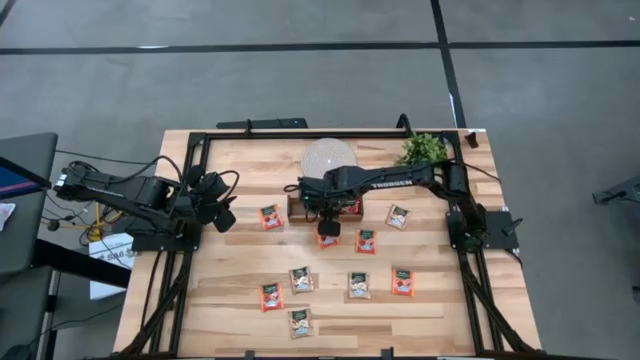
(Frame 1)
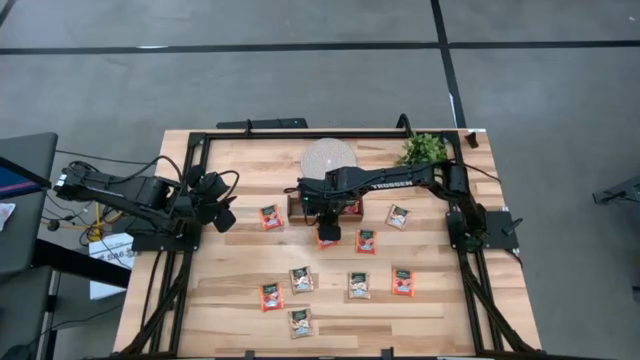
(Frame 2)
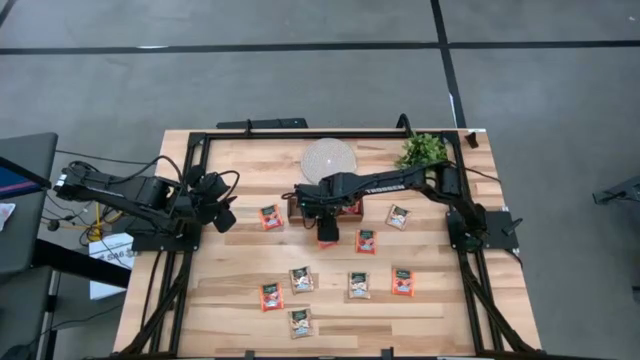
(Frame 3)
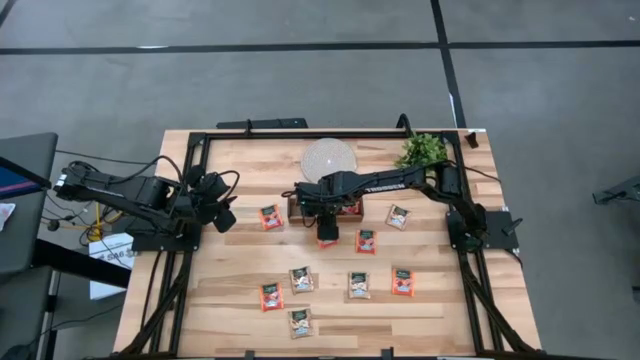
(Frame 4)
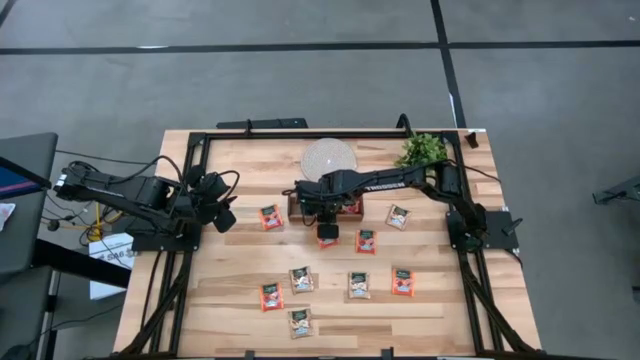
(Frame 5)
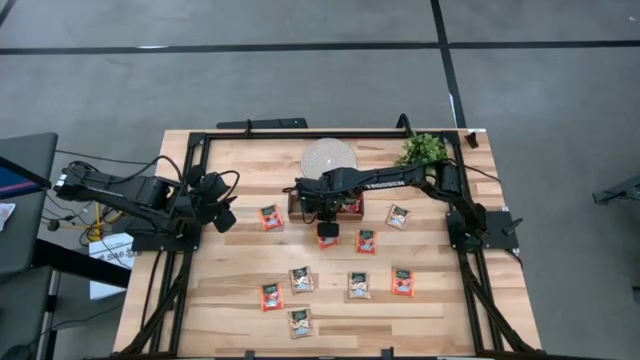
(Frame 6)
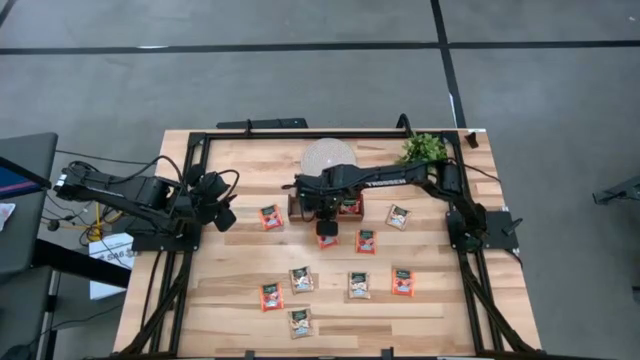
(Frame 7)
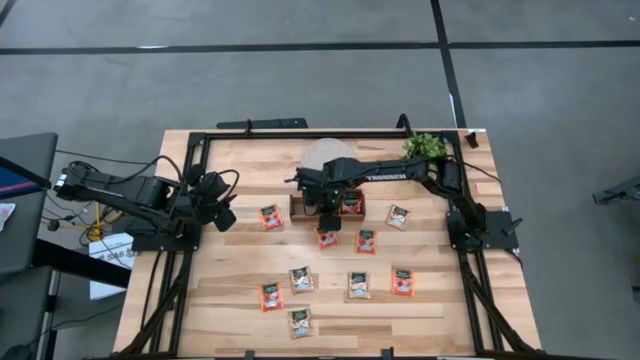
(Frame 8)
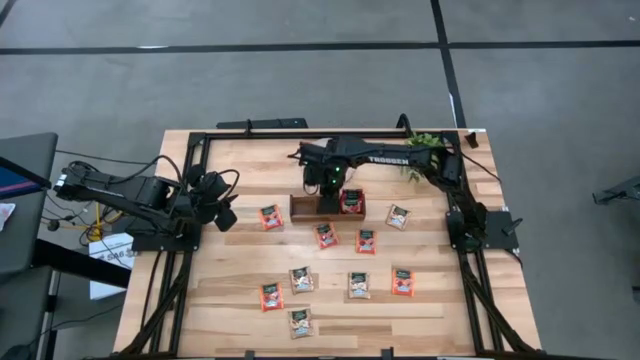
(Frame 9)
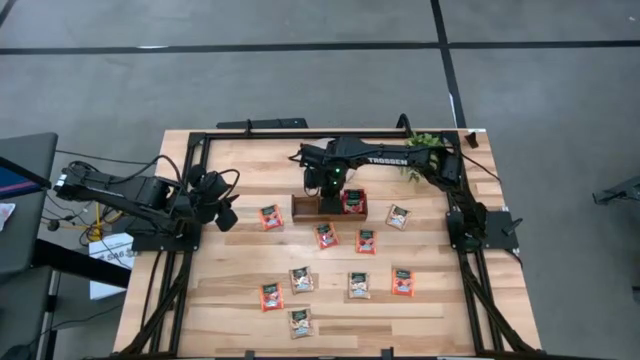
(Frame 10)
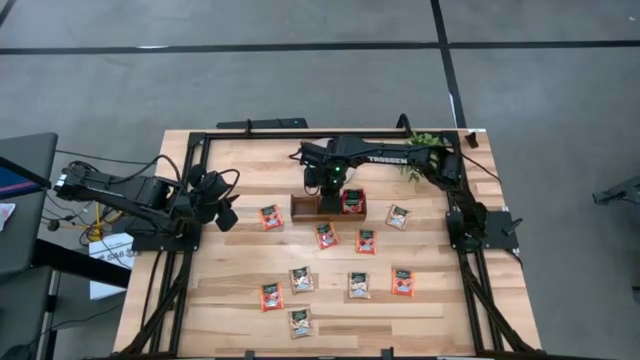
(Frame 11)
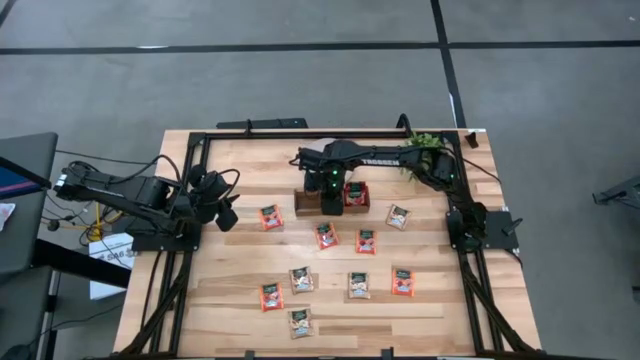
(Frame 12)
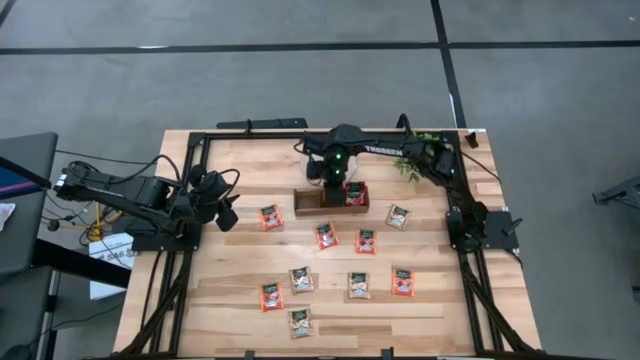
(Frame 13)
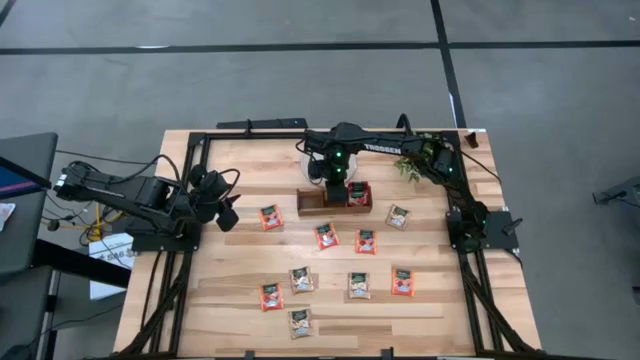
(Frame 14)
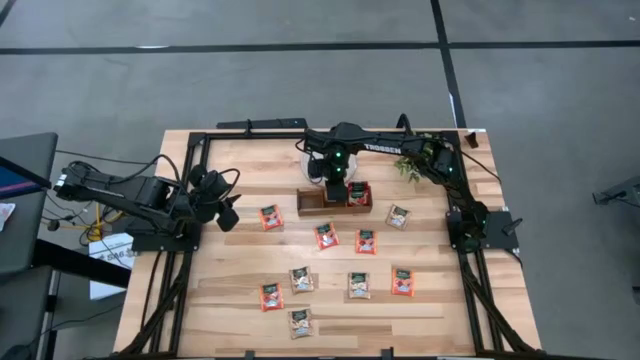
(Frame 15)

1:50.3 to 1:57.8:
Task: Pick & Place Tea
Put the brown tea bag into the middle slot of the wooden organizer

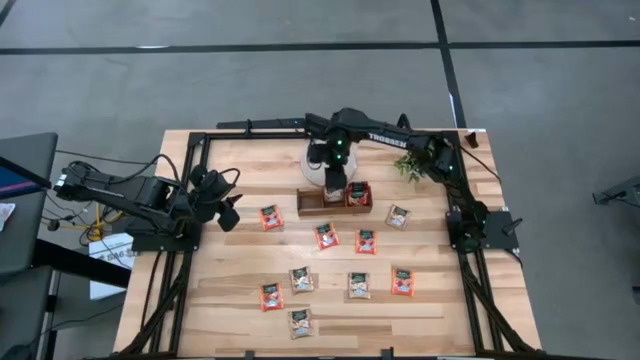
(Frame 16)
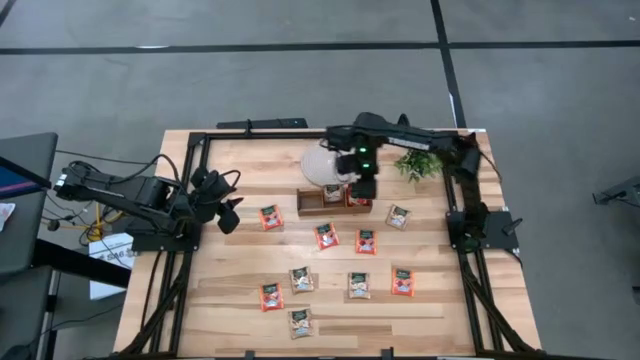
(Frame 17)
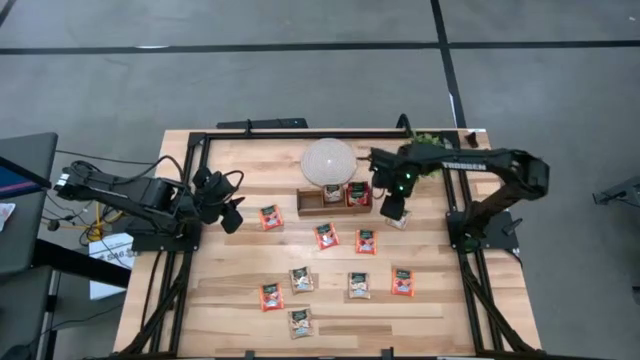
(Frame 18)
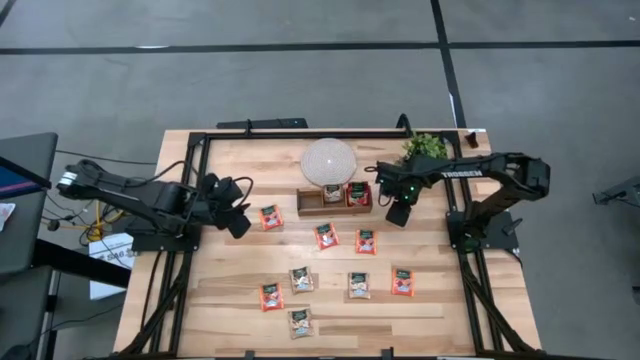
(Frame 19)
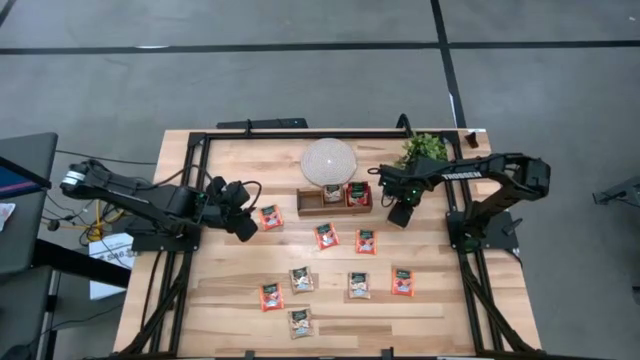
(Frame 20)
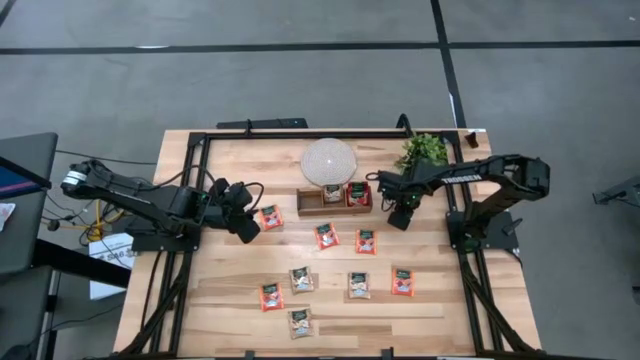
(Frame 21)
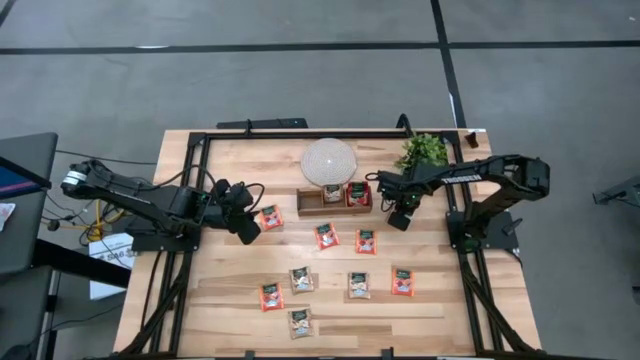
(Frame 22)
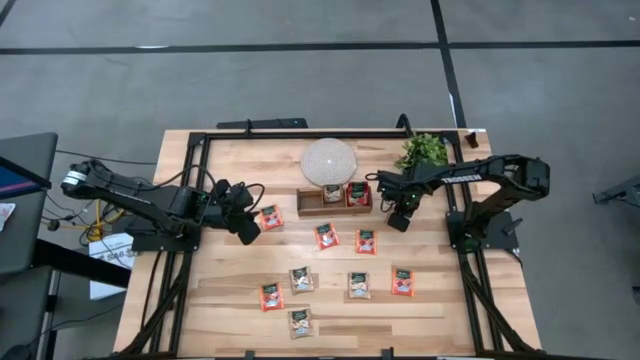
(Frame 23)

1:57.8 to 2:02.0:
Put the brown tea bag into the middle slot of the wooden organizer

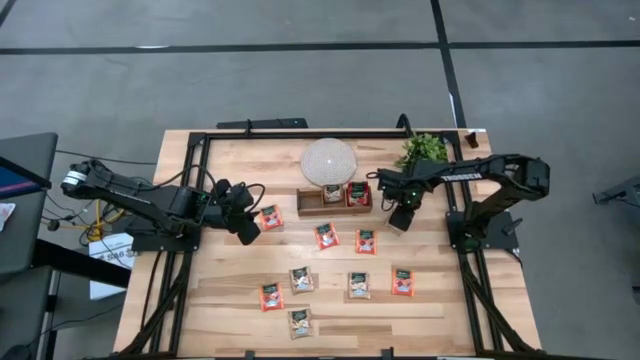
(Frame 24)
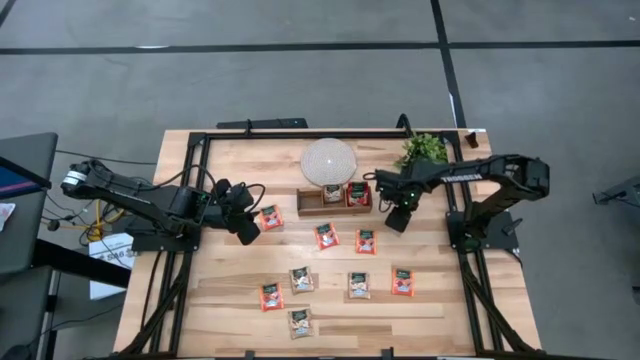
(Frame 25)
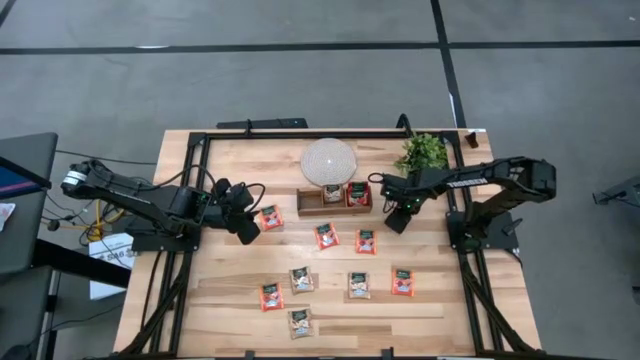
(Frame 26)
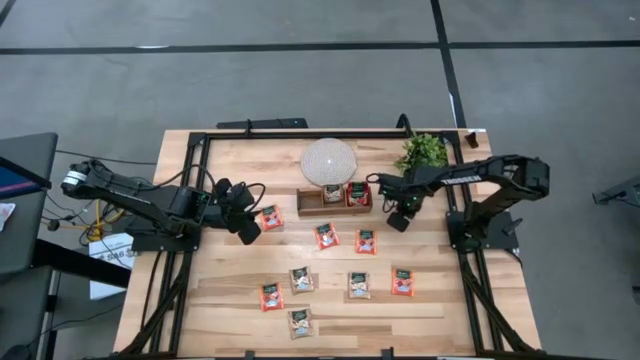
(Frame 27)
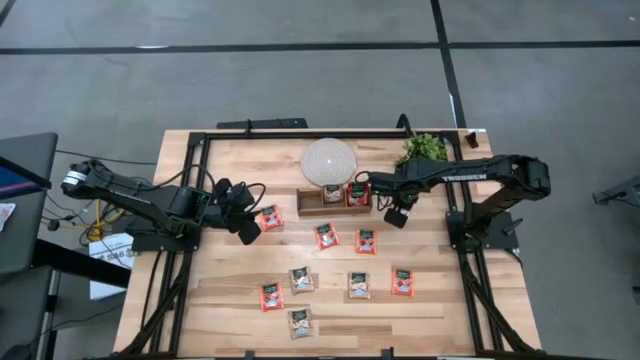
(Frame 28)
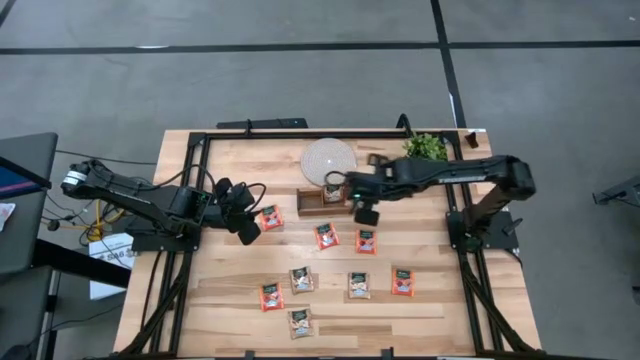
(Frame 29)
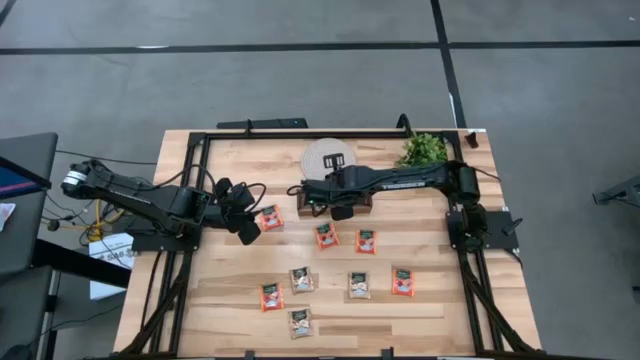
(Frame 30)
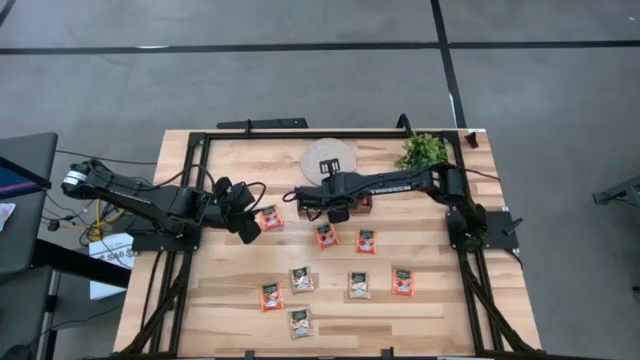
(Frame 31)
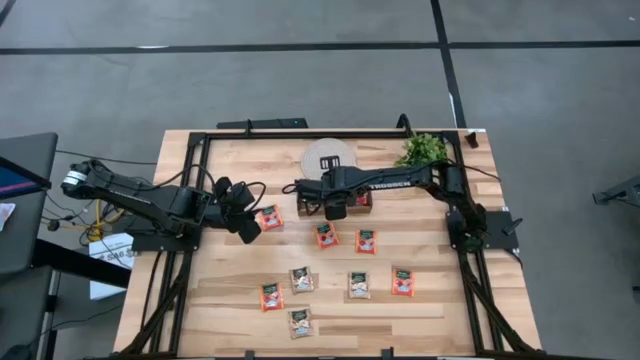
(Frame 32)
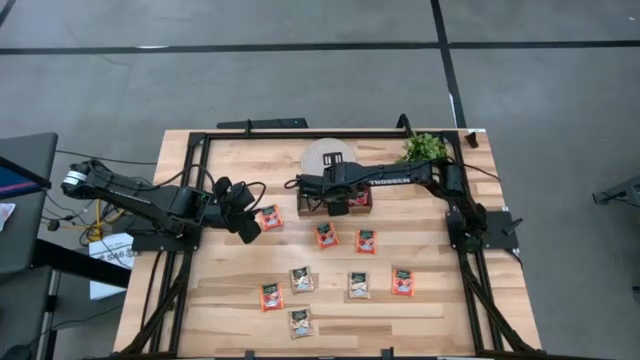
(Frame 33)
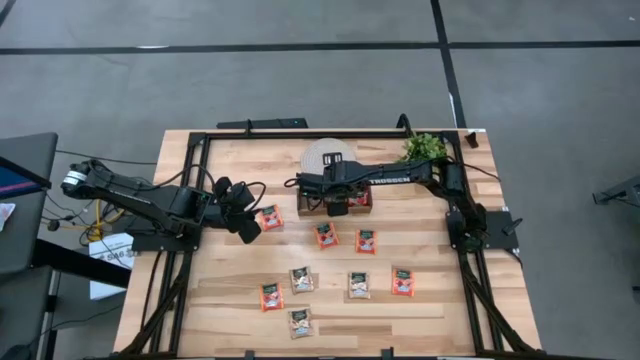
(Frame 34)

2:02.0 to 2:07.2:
Put the brown tea bag into the middle slot of the wooden organizer

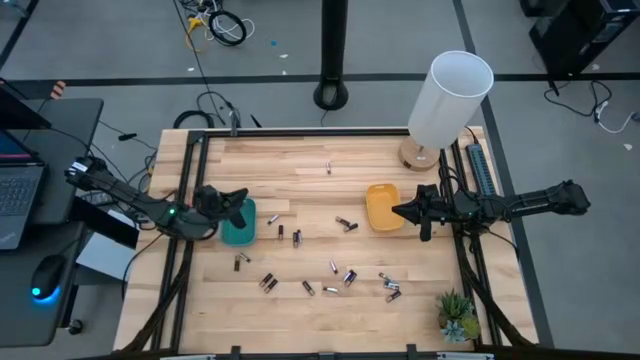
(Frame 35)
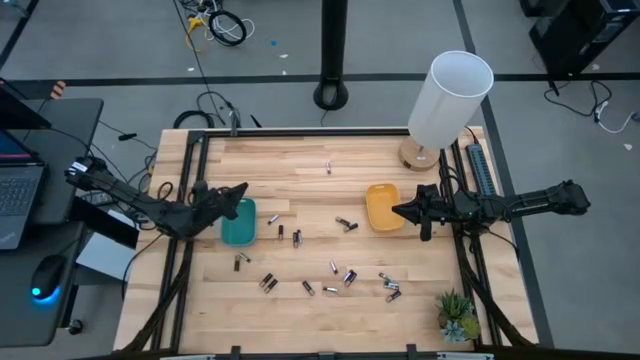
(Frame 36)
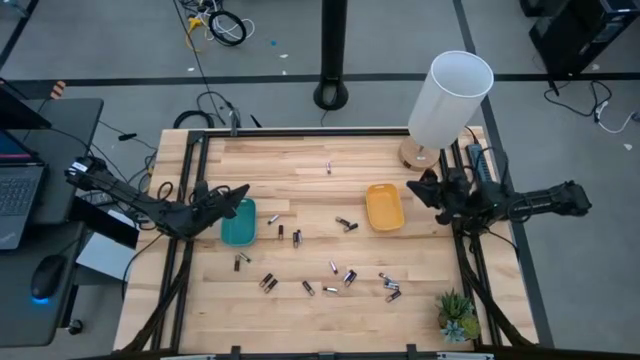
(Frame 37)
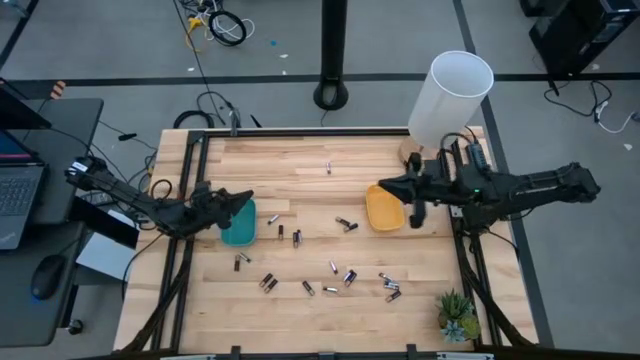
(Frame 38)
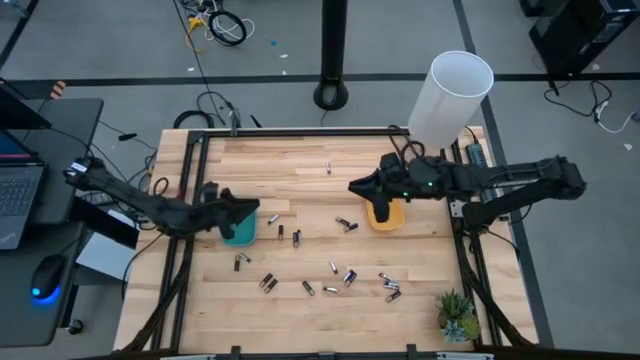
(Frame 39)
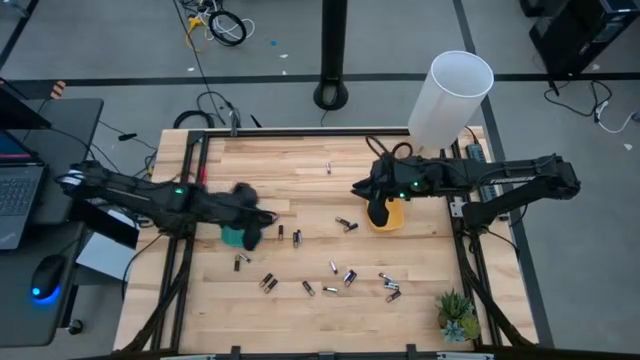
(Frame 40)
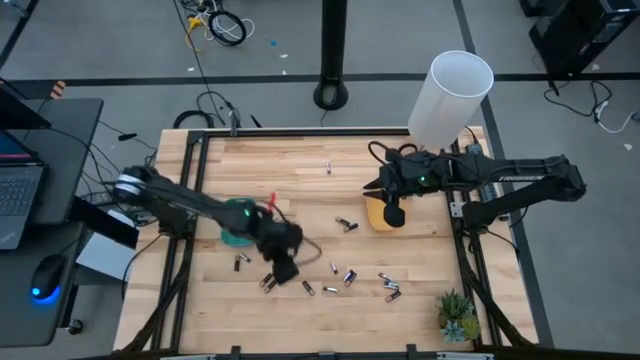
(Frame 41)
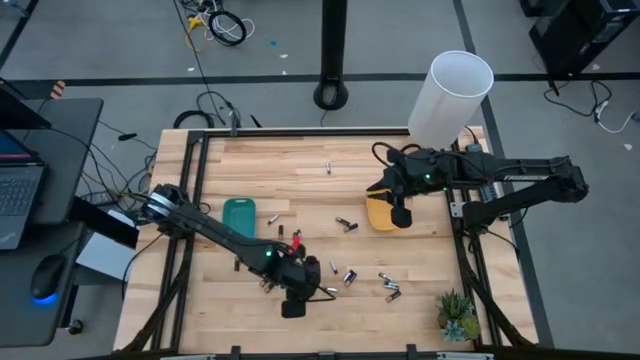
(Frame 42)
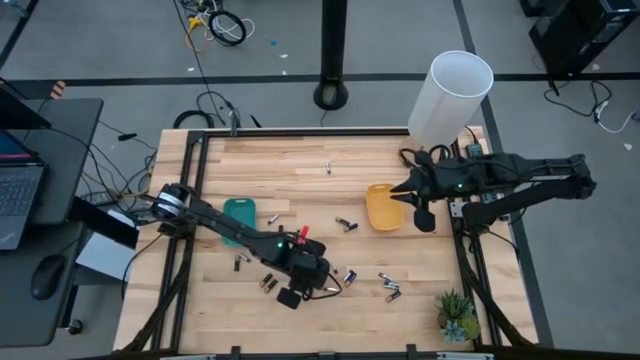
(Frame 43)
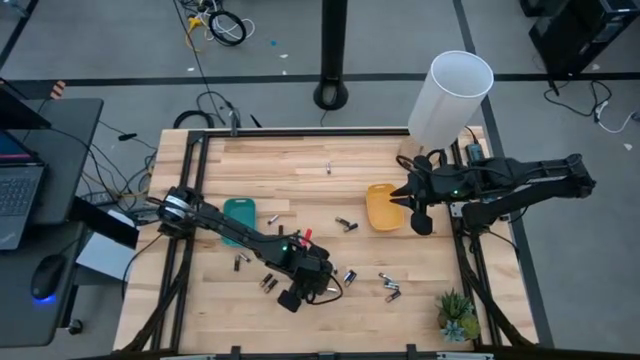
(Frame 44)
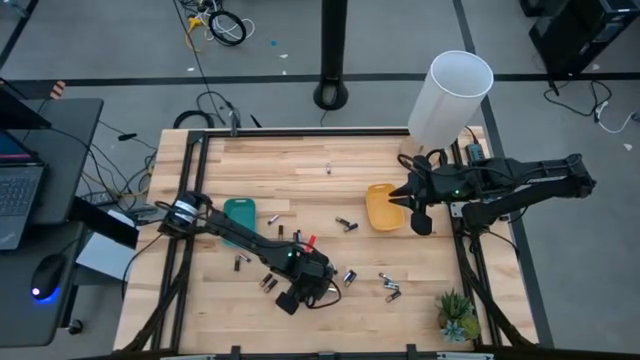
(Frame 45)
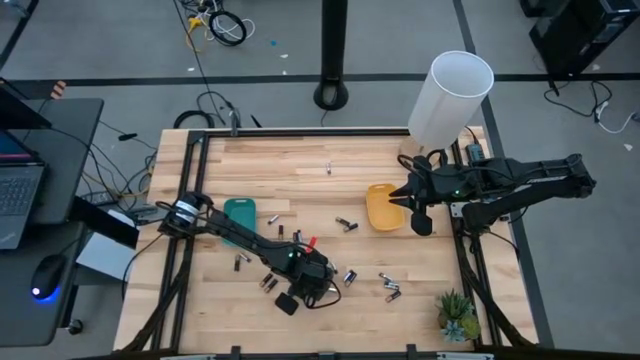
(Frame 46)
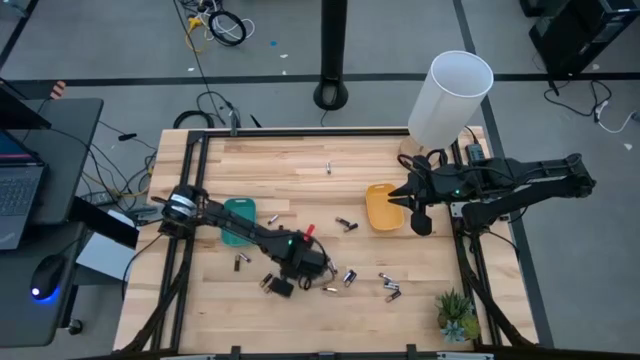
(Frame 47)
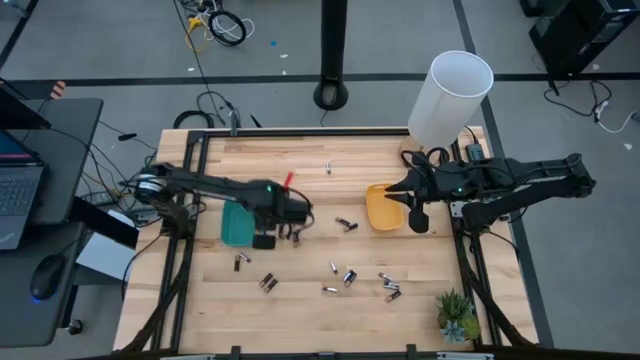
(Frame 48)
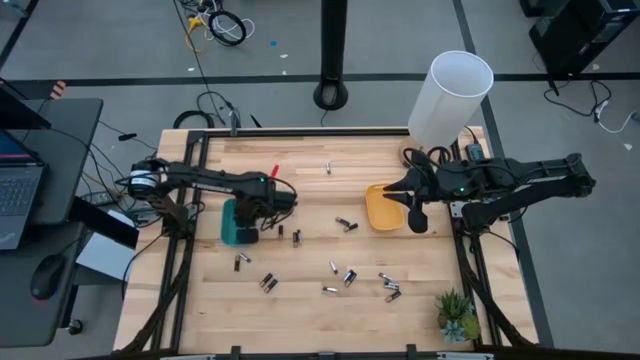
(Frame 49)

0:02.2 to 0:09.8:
Task: Sort batteries
Put the black battery into the green bin
